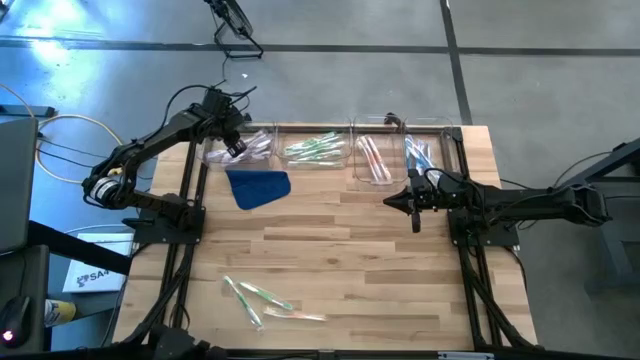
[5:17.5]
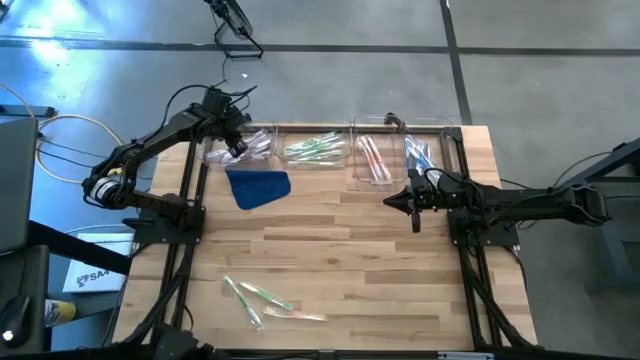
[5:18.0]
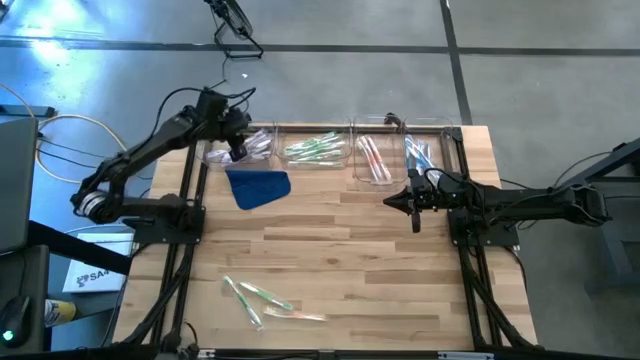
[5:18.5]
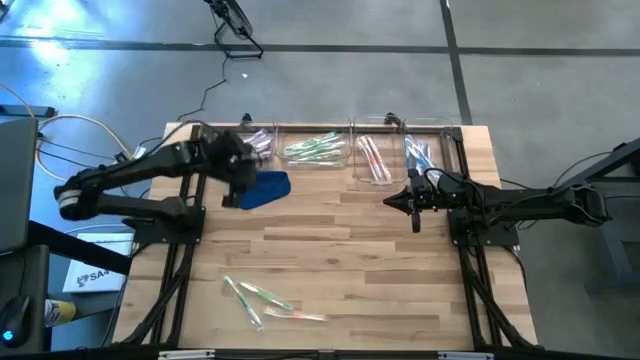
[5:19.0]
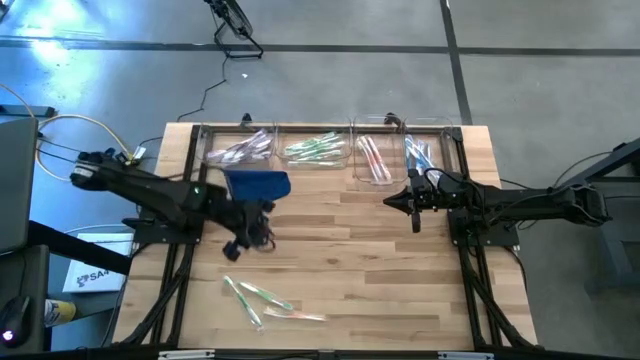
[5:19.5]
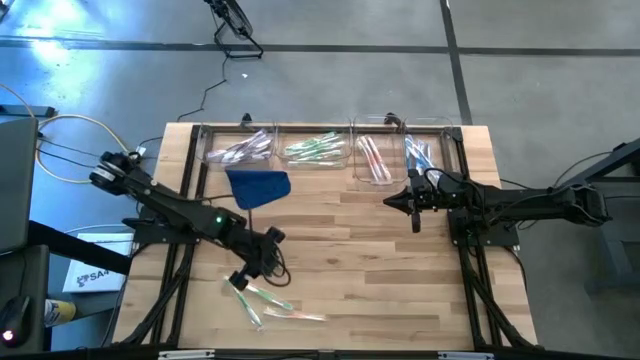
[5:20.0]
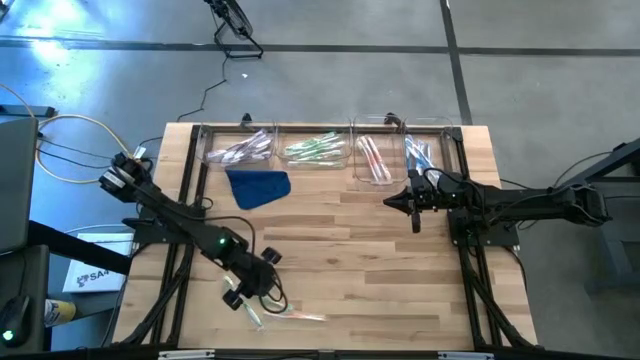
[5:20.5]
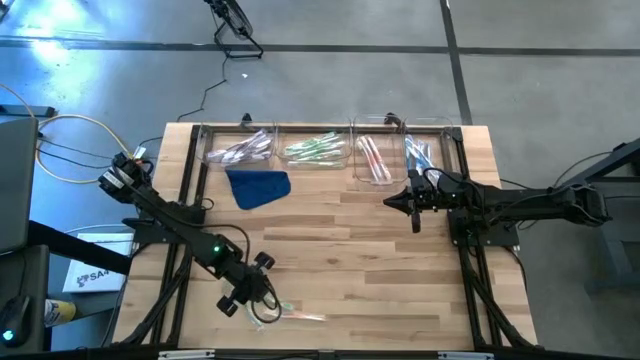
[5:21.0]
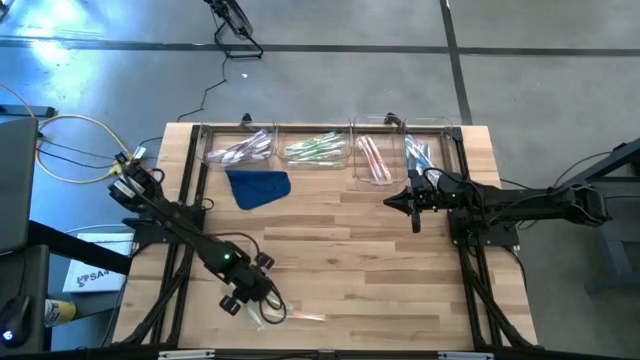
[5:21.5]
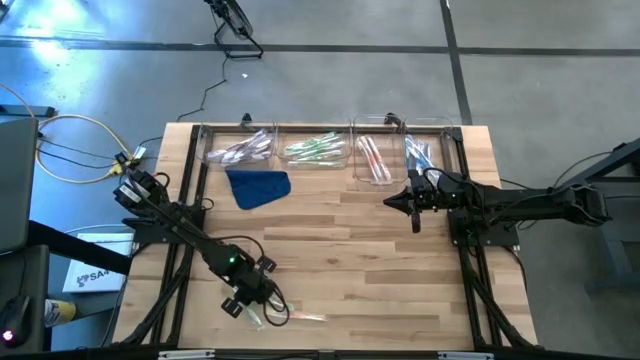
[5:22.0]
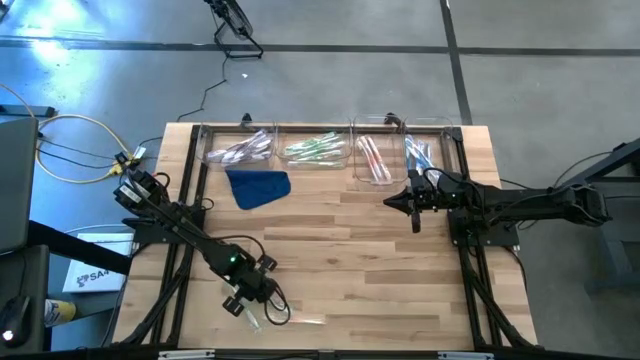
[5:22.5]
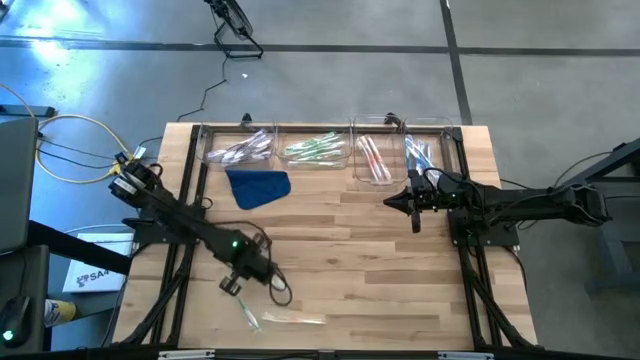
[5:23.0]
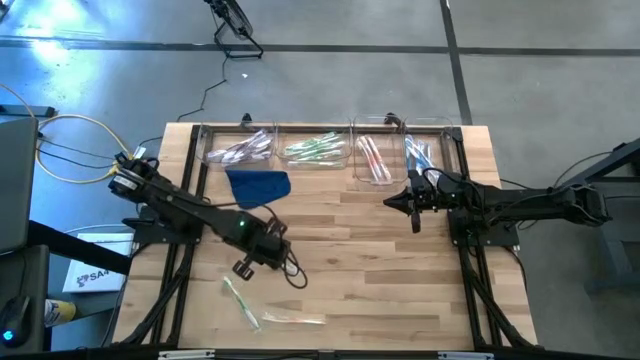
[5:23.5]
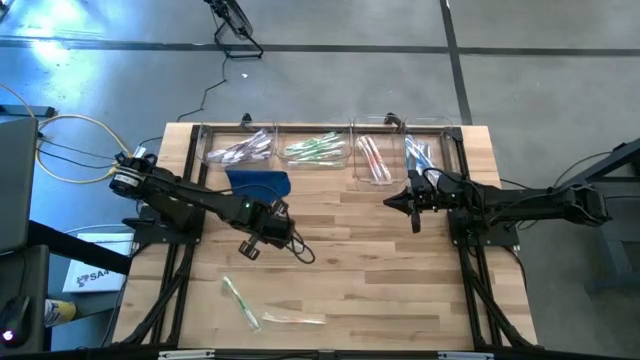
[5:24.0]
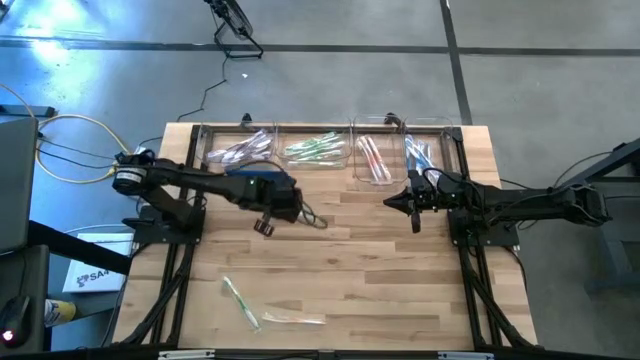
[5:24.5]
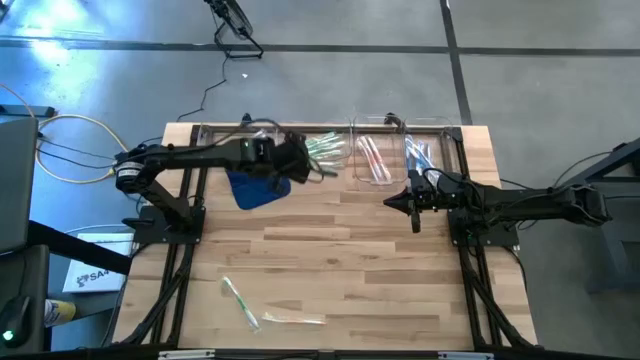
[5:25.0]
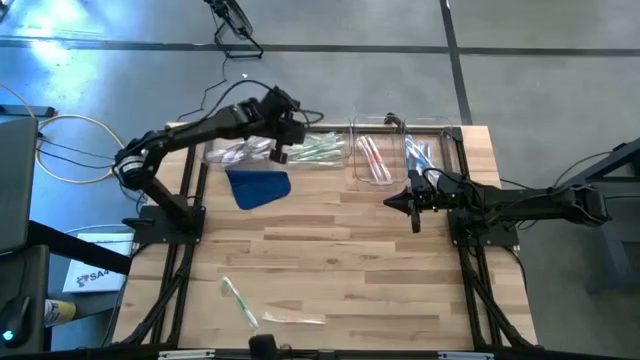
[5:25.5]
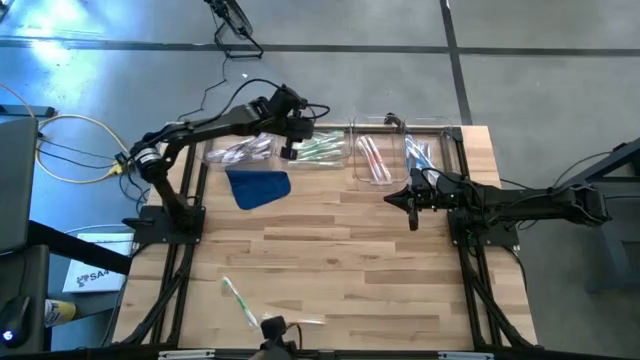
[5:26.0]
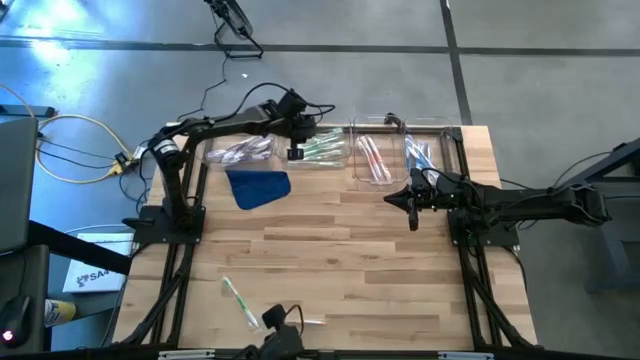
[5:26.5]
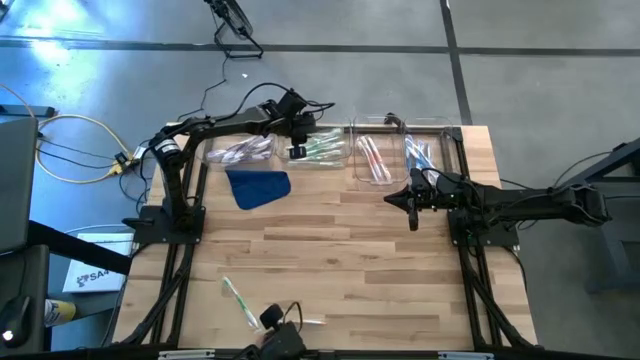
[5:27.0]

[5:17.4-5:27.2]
Task: Pick & Place Toothbrushes
Put the green toothbrush into the middle left transparent bin

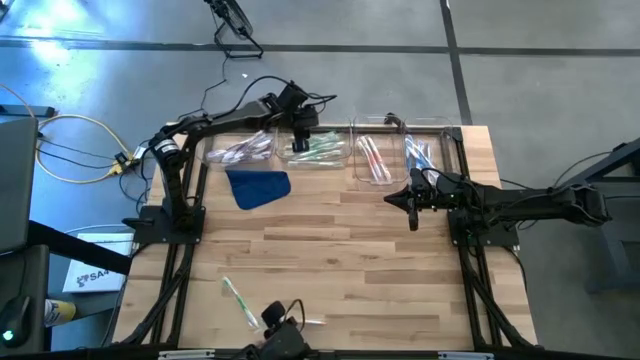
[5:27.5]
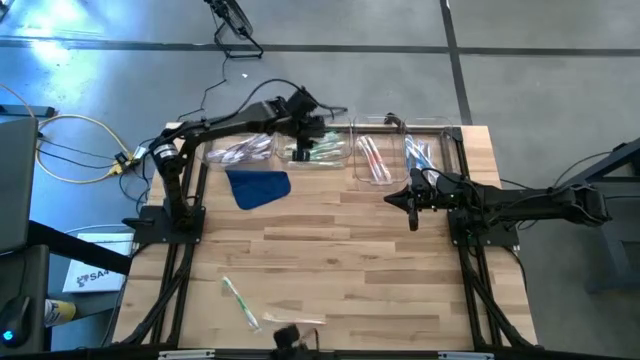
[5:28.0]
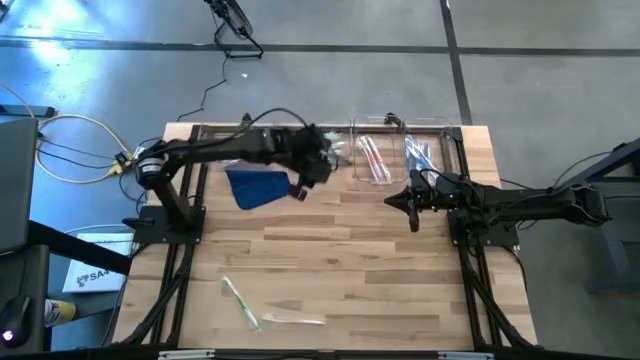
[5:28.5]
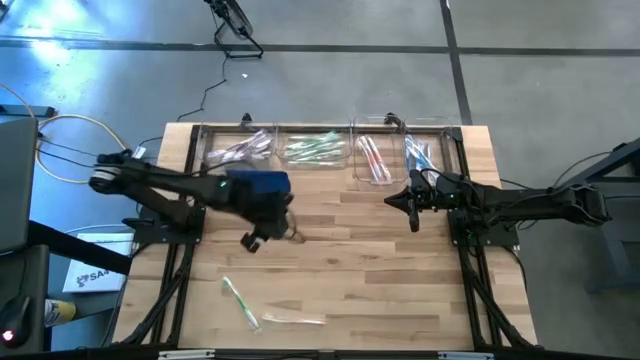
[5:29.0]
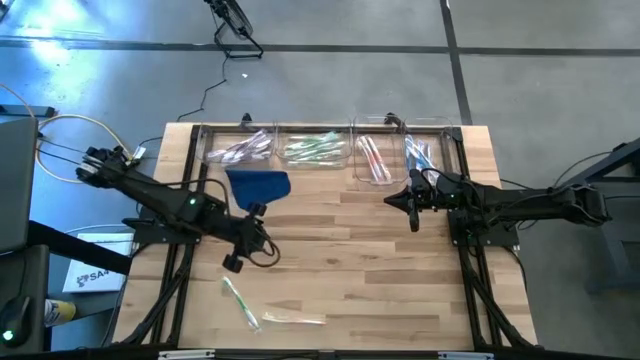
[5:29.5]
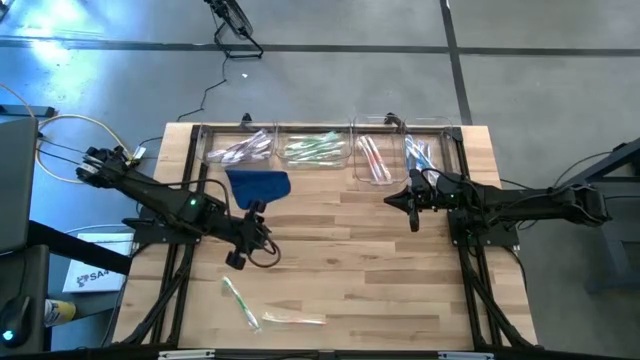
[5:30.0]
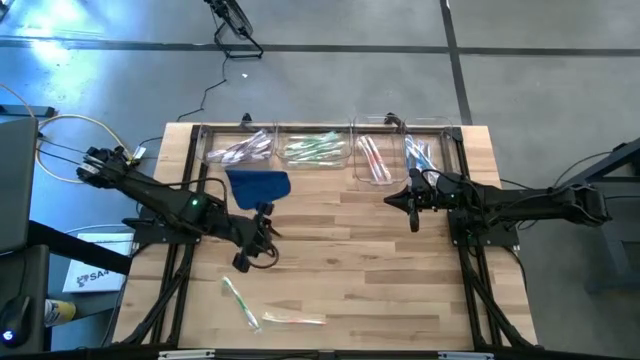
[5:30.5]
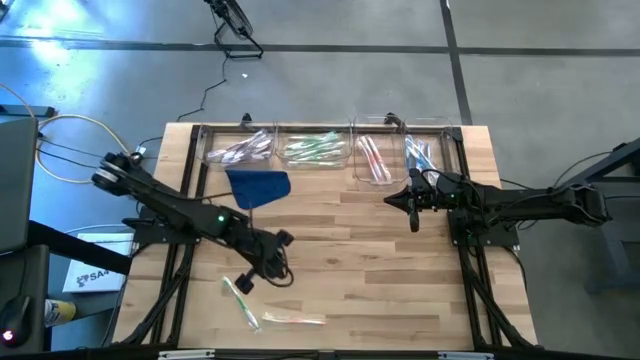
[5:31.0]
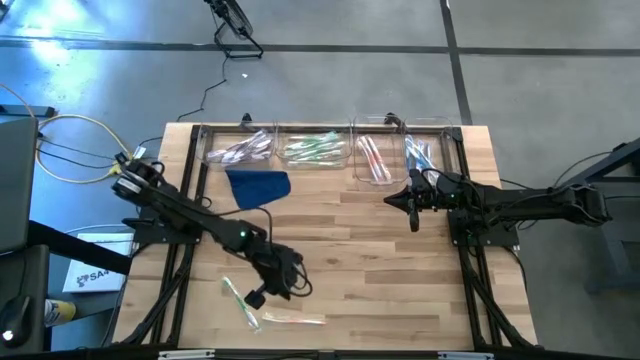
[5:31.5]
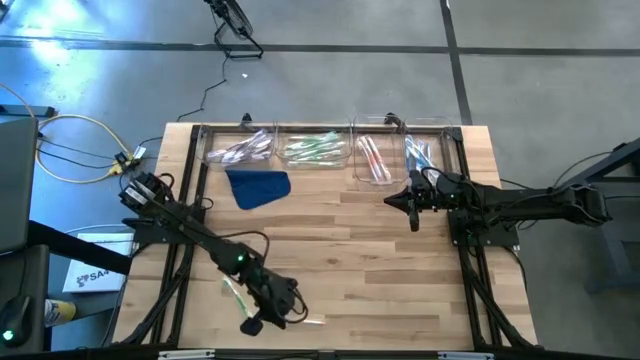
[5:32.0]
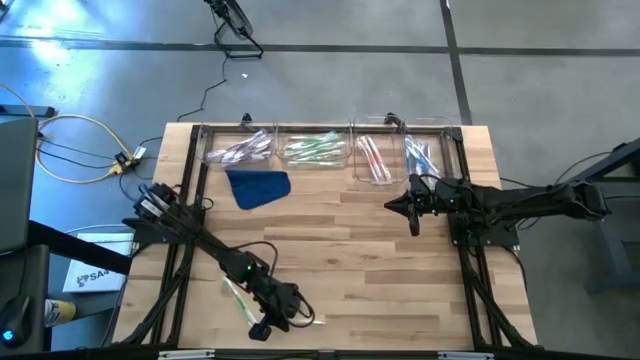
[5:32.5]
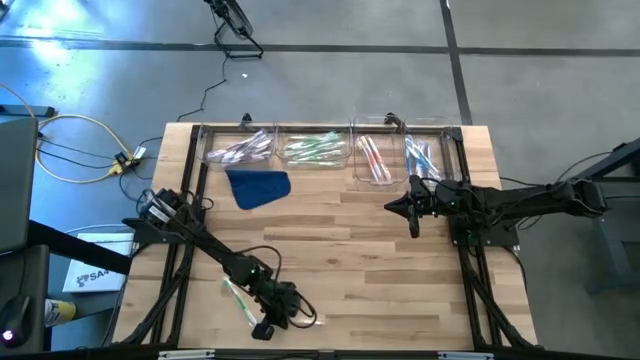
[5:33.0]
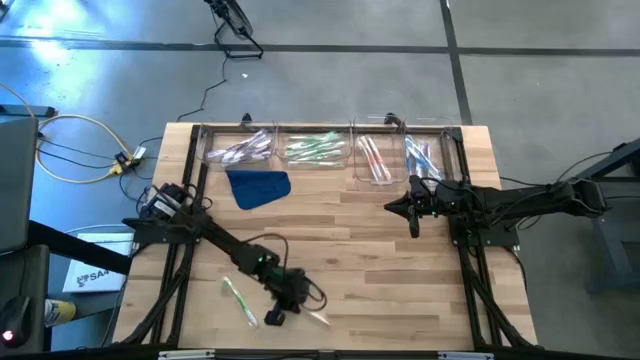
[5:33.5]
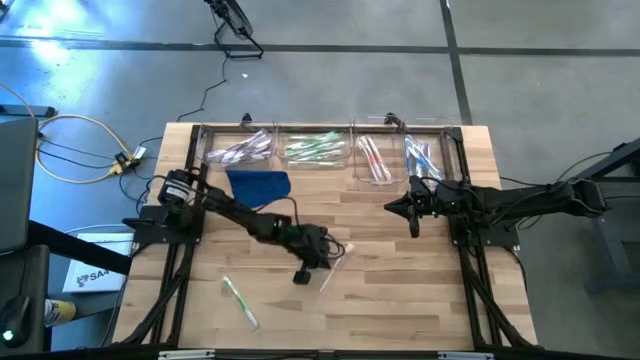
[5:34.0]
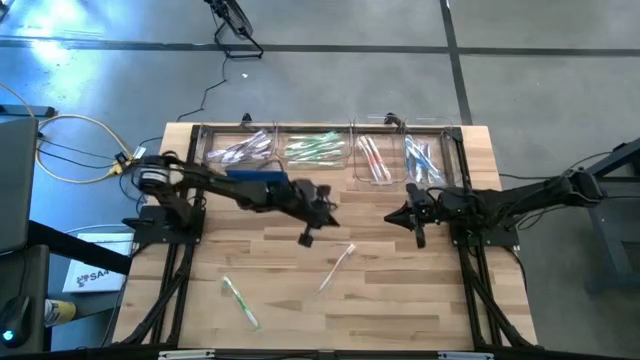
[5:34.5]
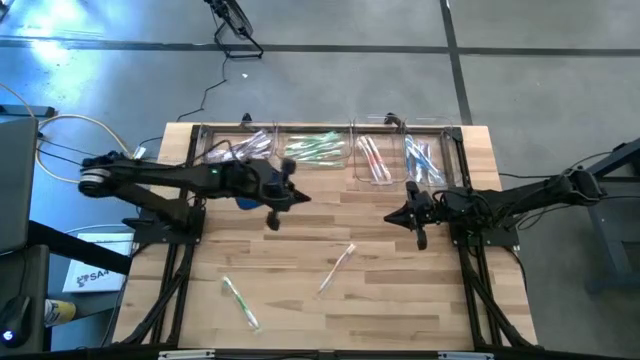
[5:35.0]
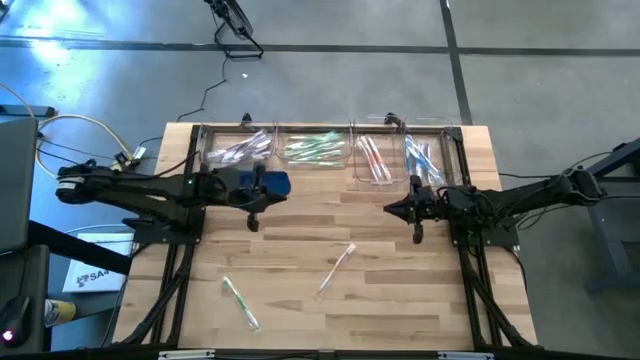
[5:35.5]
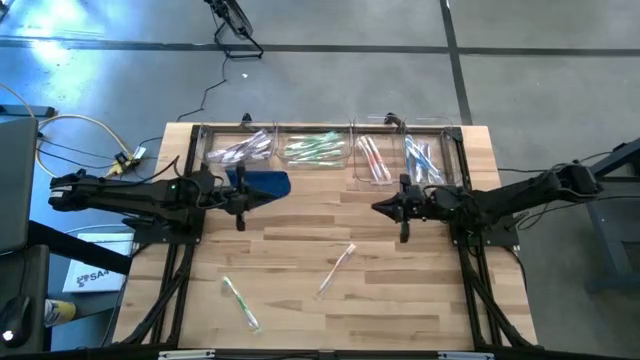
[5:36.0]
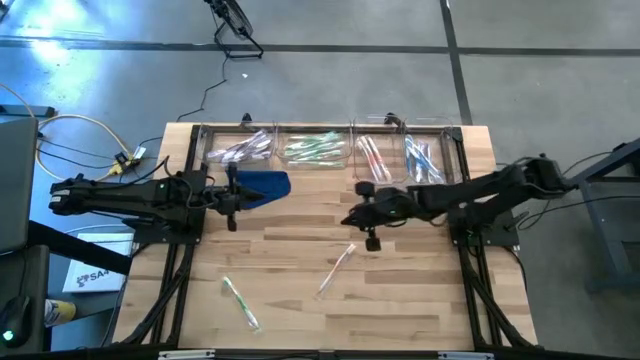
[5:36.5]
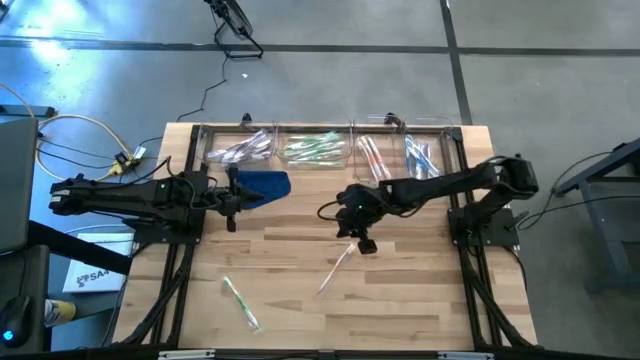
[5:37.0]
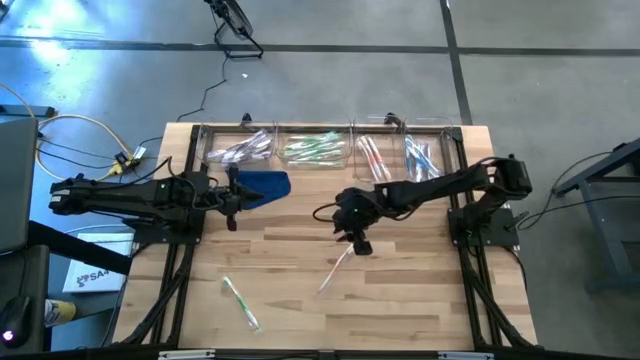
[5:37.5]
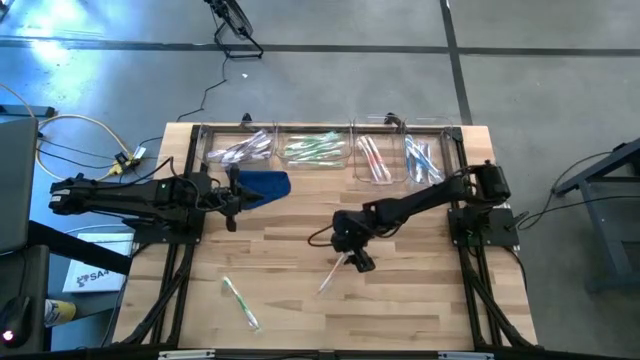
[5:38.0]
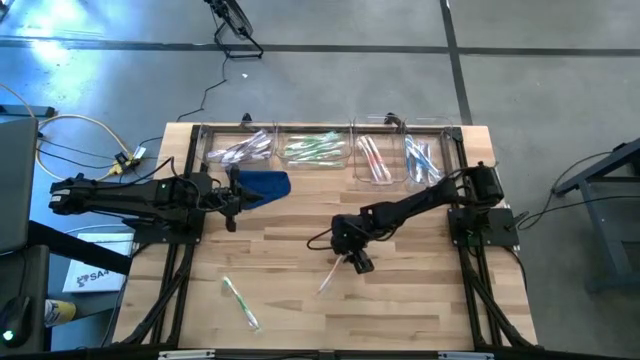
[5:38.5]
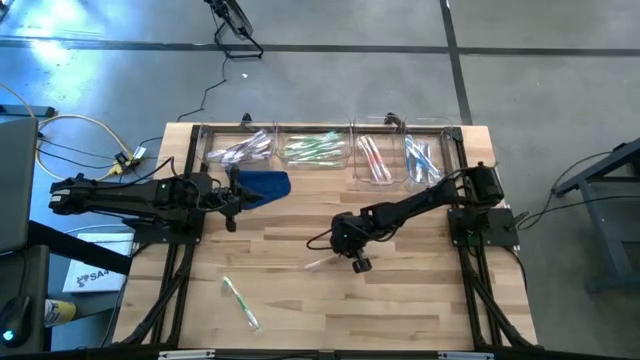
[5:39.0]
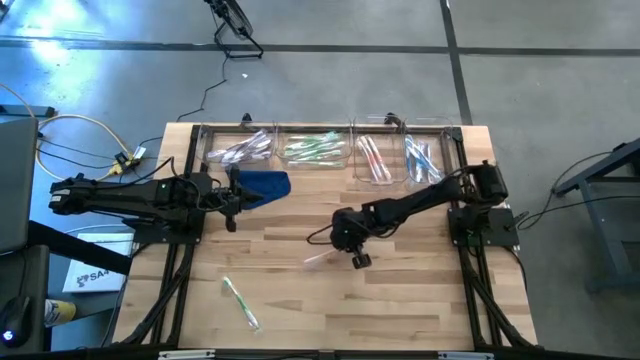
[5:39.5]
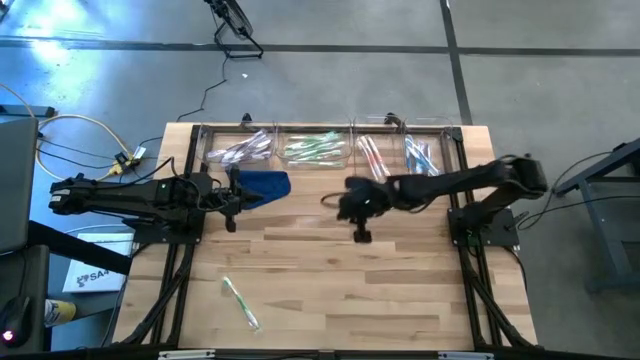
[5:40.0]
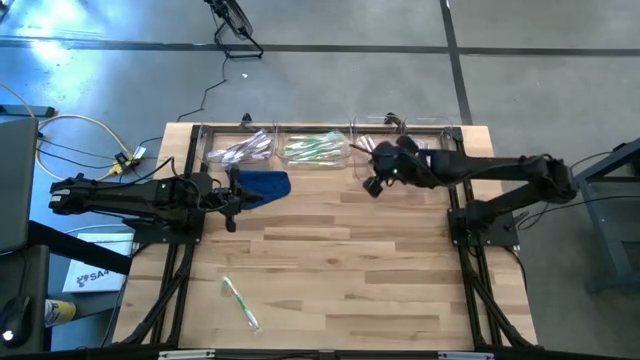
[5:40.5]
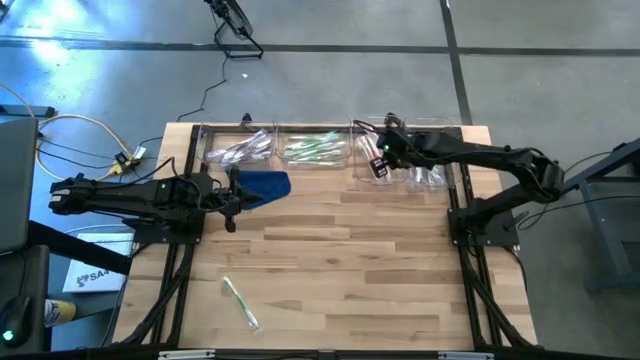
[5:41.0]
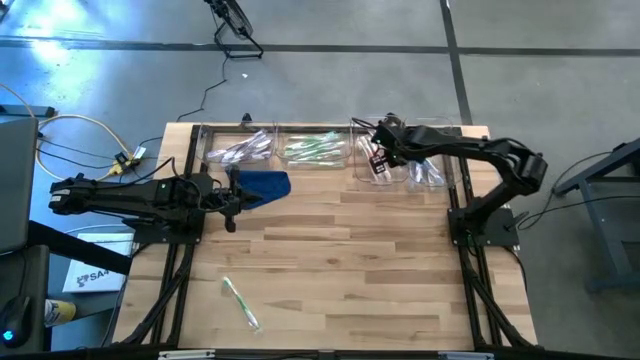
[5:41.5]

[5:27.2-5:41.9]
Put the orange toothbrush into the middle right transparent bin
